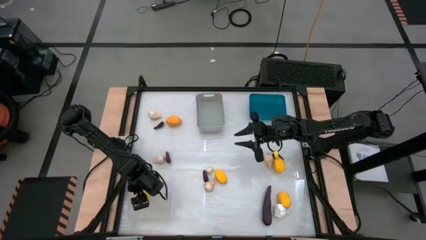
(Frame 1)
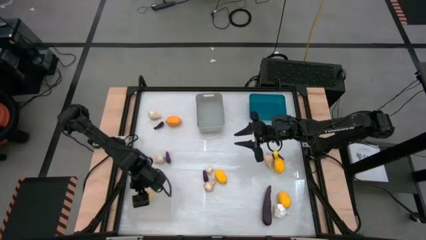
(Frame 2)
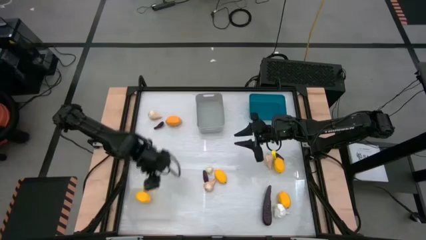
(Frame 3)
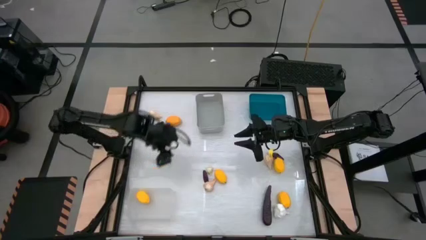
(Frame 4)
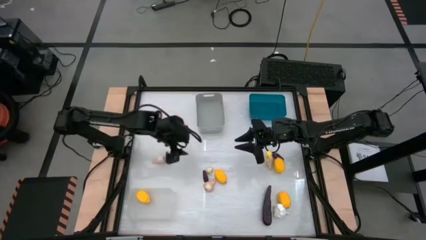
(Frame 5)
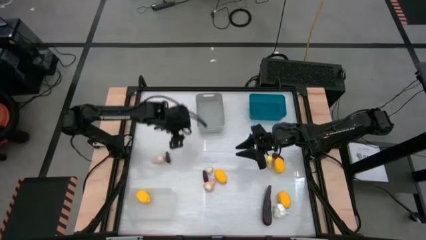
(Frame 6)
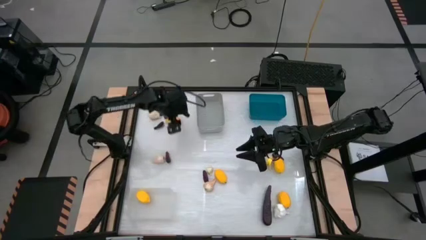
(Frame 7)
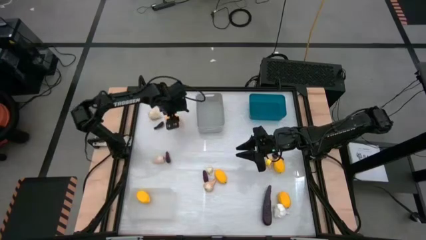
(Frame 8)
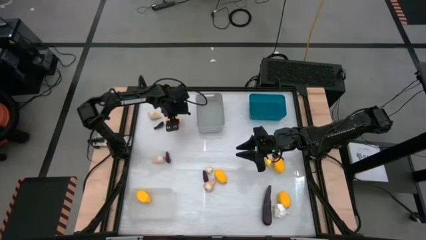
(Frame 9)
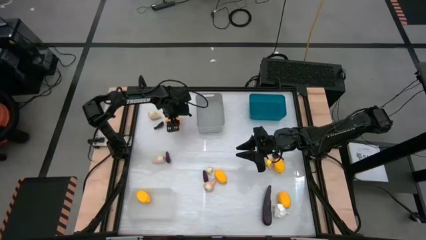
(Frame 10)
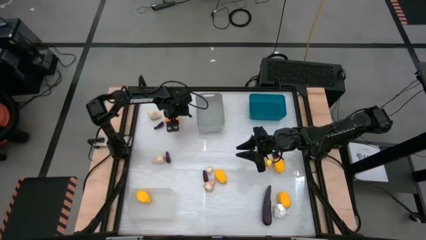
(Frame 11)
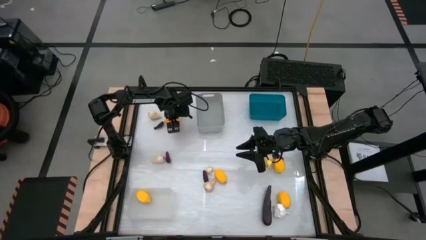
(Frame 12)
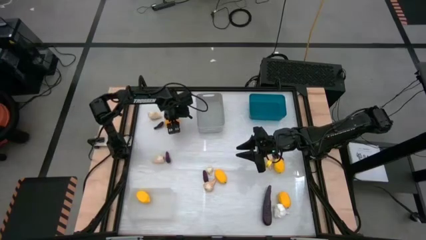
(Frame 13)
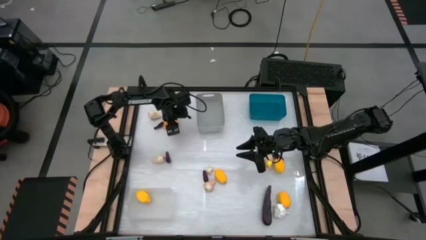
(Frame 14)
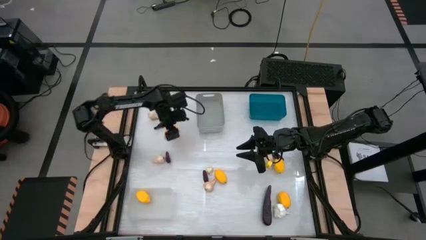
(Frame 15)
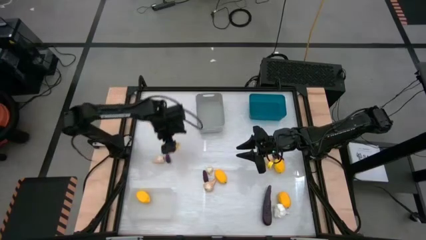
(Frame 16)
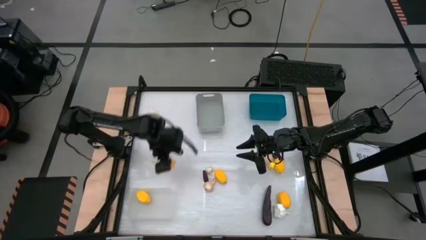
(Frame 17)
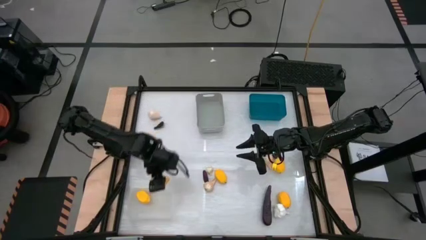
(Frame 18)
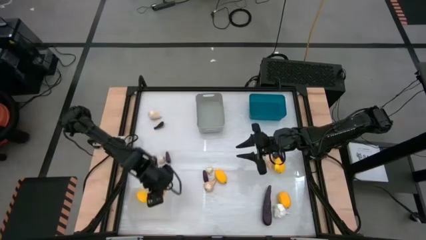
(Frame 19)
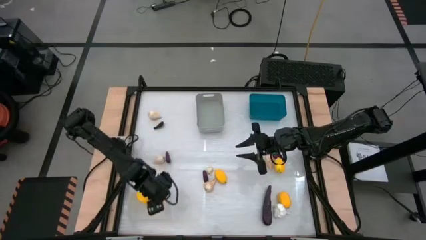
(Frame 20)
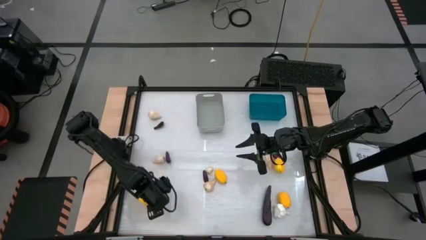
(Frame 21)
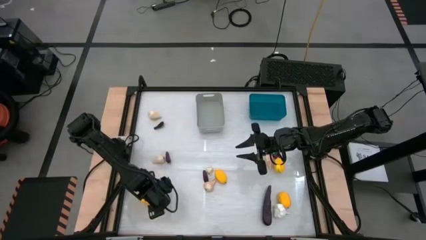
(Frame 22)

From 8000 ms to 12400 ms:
Task: Sort produce into baskets
Put the lemon into the transparent bin

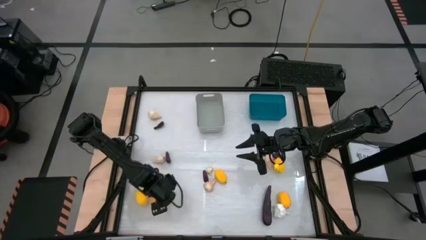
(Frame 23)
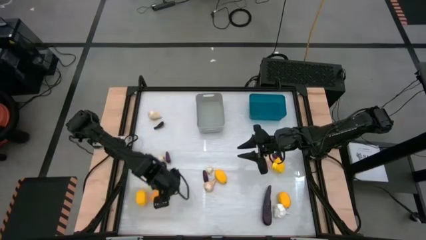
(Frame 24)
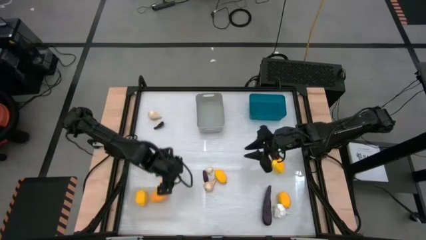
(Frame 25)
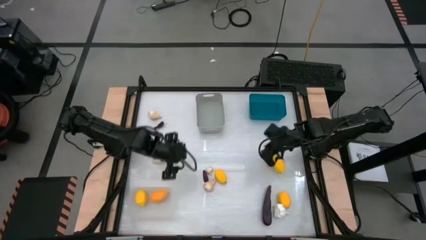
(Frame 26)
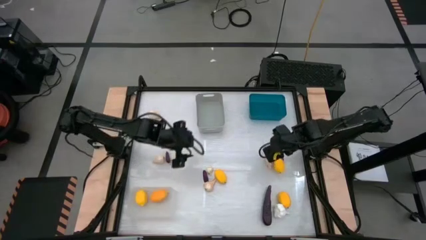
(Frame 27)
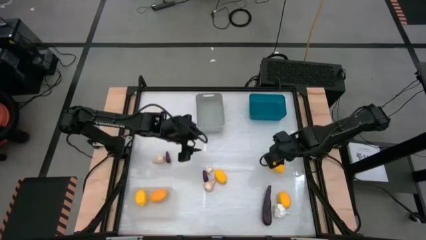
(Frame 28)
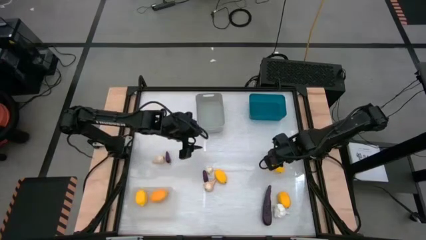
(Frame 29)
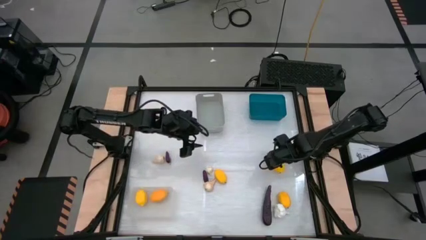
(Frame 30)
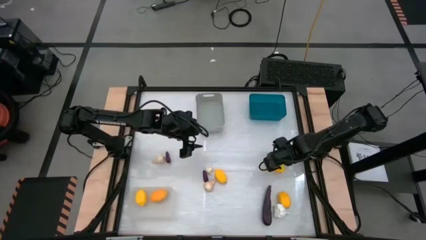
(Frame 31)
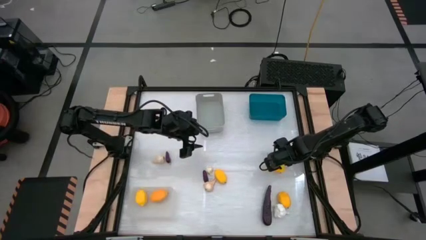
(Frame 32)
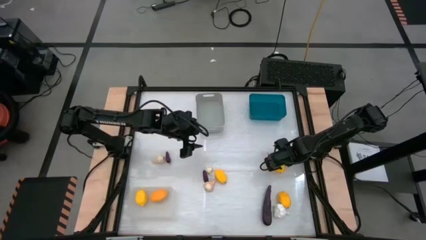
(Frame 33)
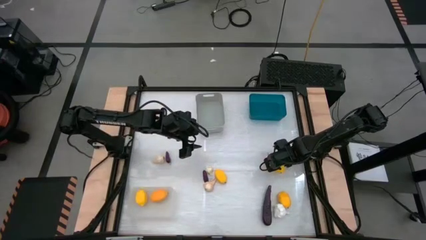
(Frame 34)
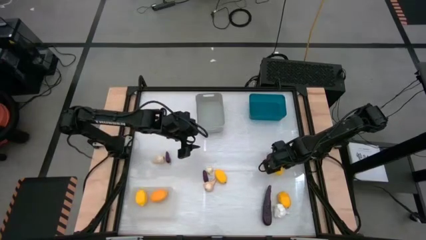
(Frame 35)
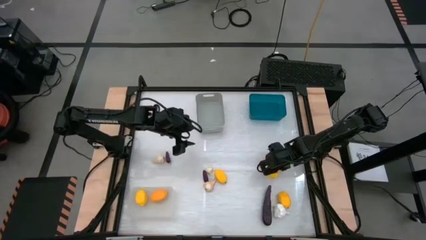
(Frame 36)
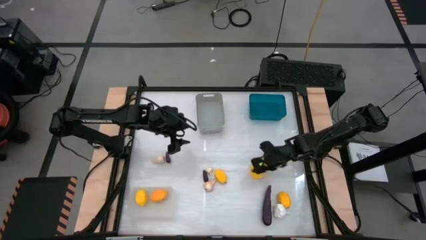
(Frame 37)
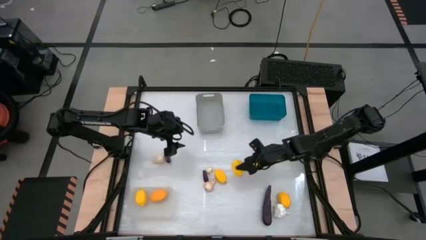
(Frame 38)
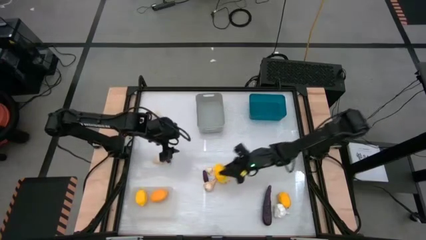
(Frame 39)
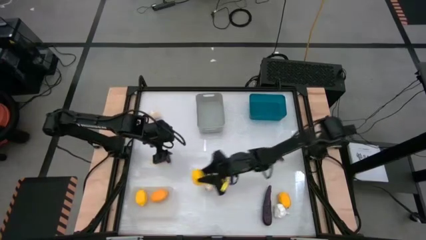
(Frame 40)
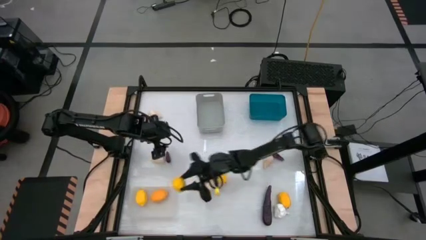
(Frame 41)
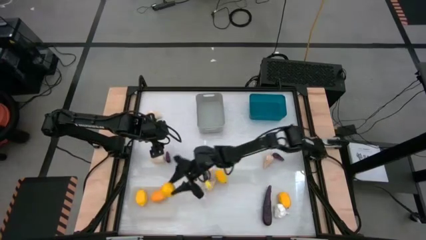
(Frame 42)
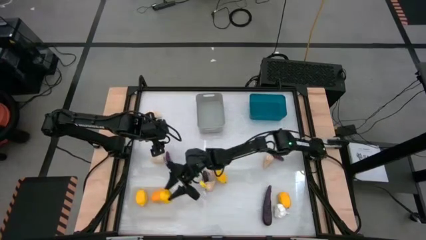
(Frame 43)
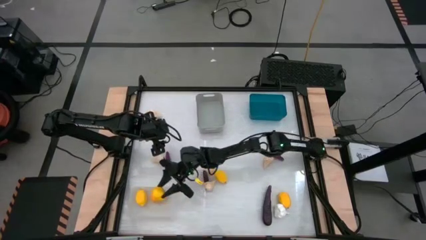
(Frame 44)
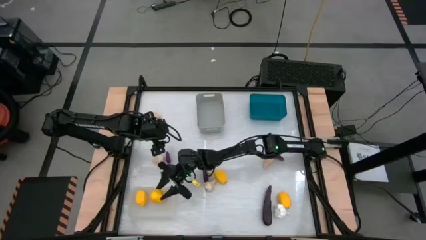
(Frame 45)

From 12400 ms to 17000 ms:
Put the lemon into the transparent bin

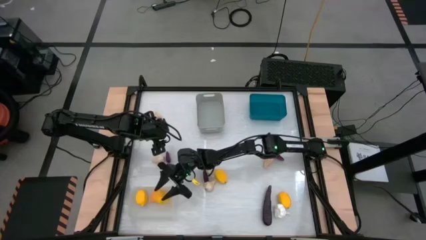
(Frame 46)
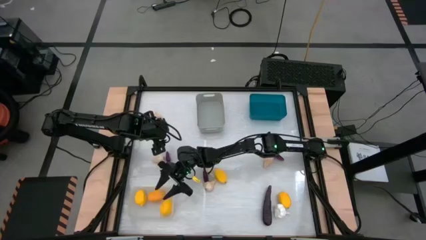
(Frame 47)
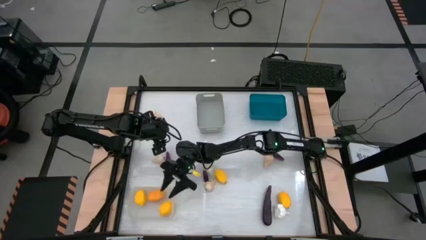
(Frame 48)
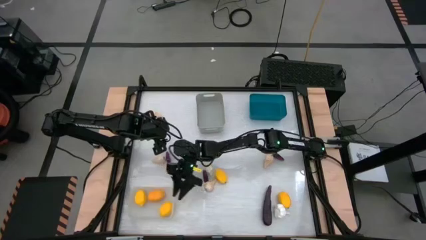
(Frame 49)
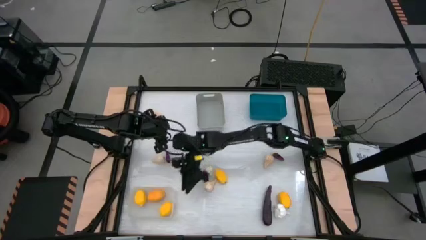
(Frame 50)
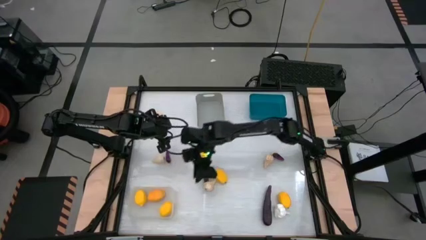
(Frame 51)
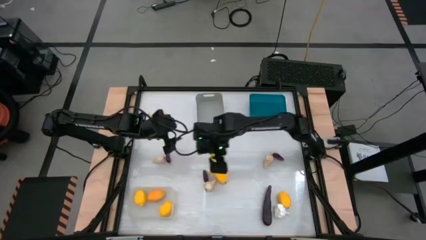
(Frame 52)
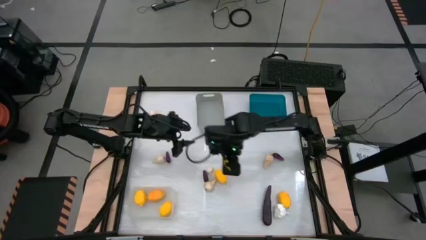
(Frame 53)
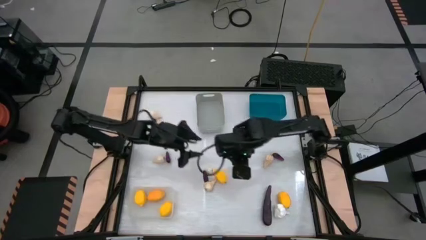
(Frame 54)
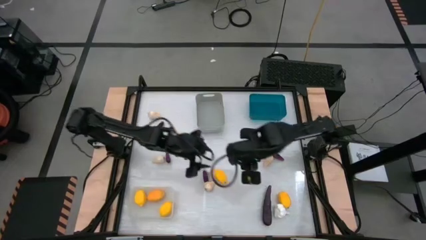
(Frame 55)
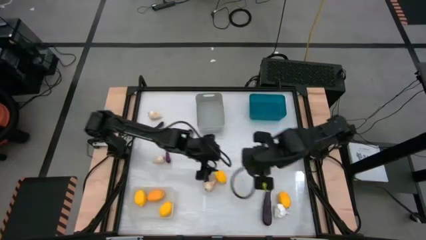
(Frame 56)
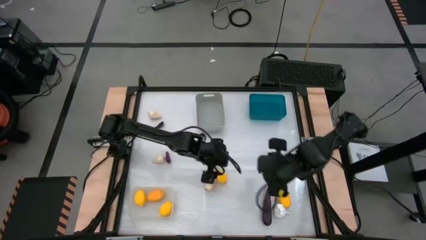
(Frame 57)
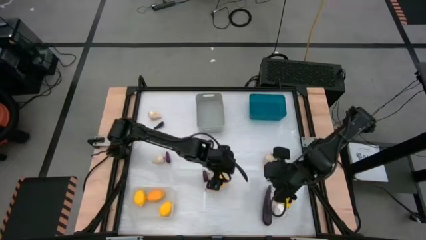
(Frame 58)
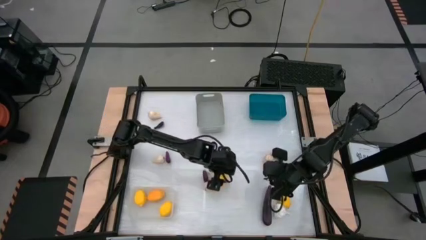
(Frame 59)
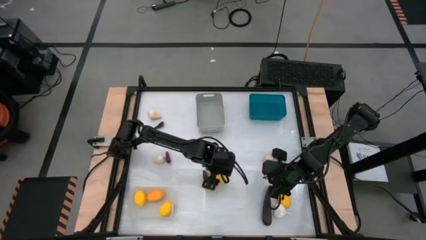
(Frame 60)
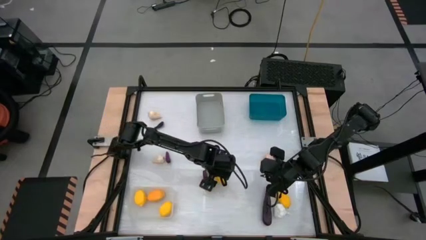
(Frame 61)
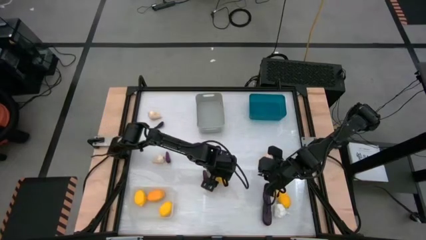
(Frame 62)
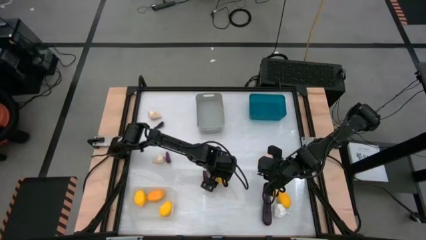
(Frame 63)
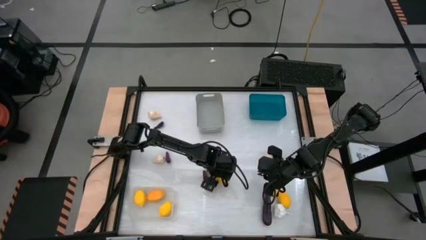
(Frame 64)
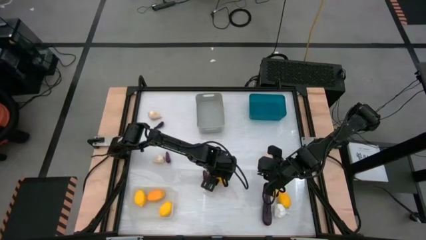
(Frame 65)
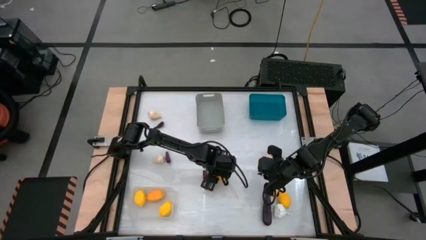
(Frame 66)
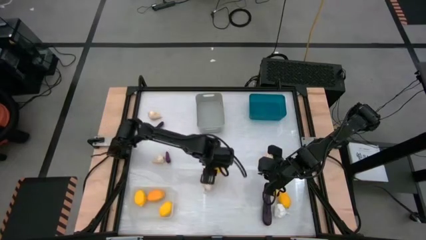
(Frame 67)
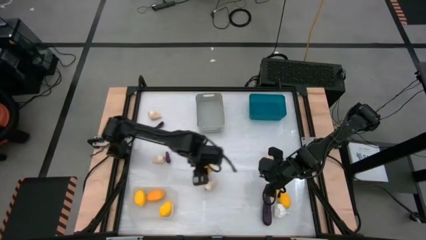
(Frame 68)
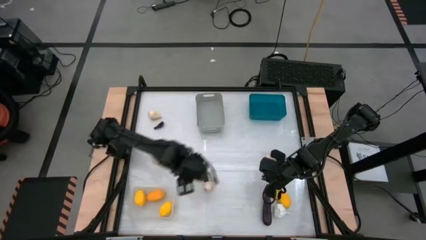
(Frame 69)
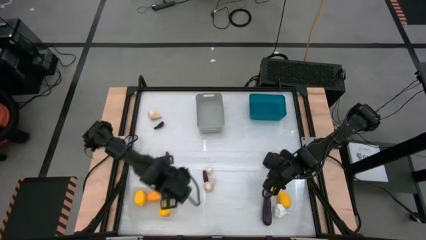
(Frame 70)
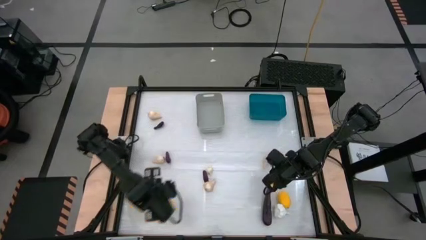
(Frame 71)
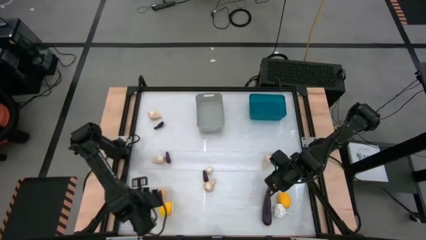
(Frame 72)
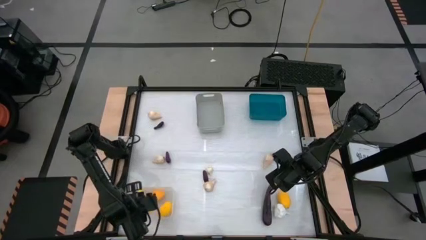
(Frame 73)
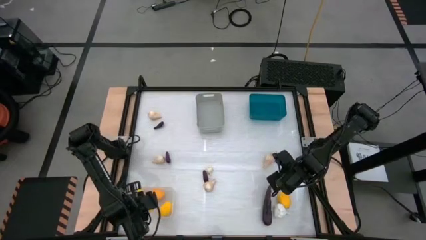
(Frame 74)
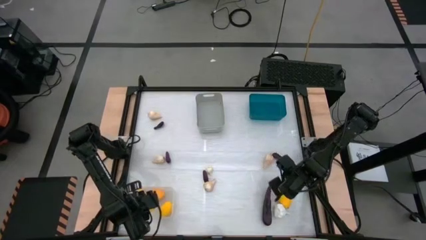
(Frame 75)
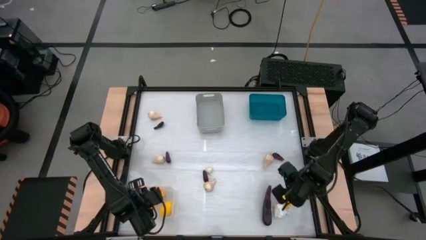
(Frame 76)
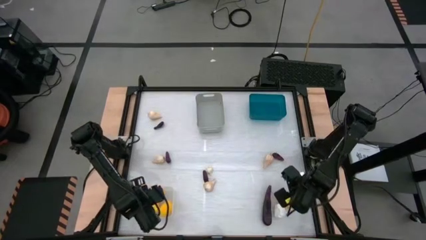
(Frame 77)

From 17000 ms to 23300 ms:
Put the lemon into the transparent bin

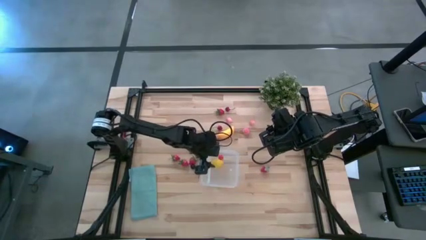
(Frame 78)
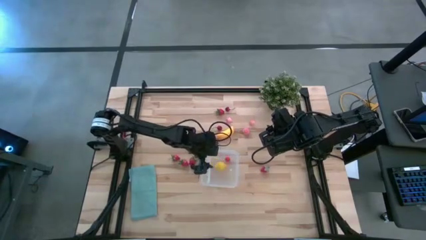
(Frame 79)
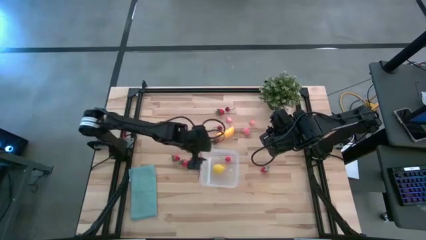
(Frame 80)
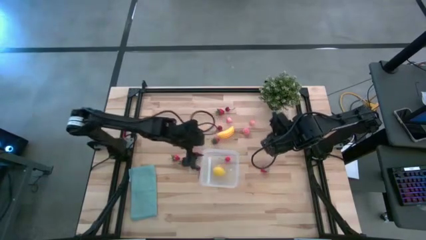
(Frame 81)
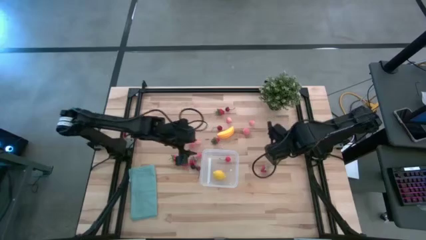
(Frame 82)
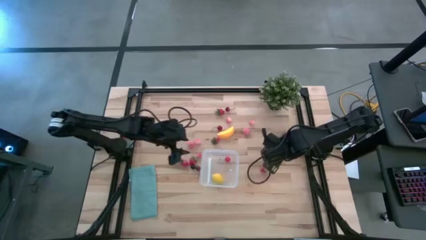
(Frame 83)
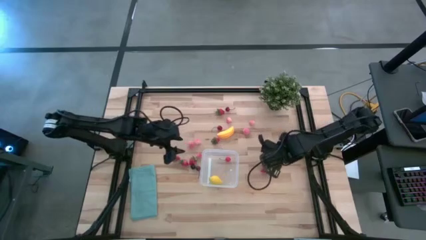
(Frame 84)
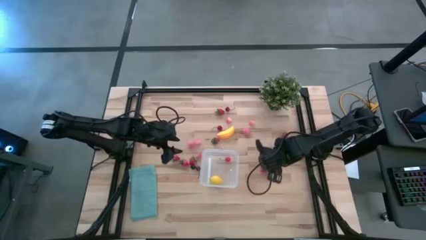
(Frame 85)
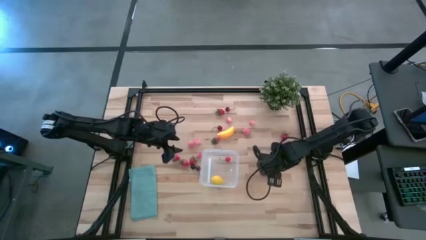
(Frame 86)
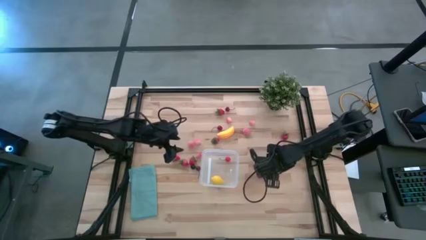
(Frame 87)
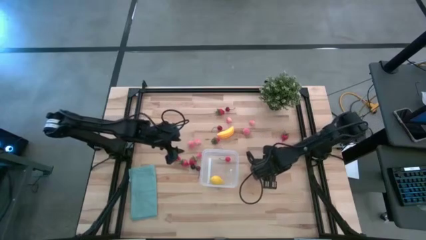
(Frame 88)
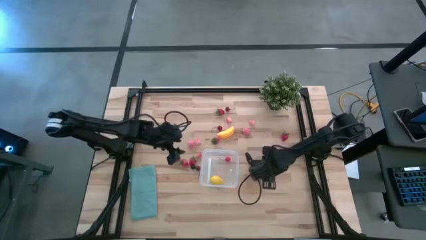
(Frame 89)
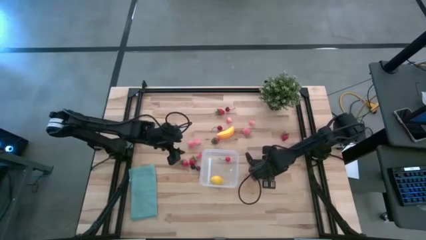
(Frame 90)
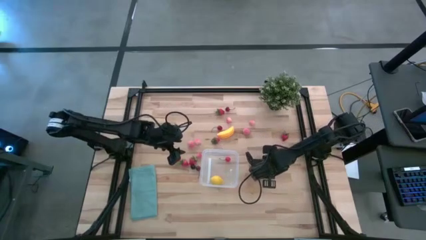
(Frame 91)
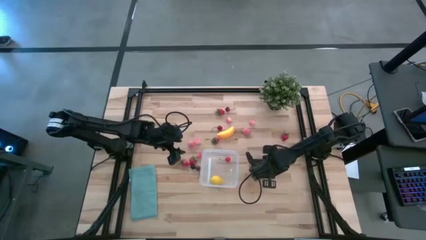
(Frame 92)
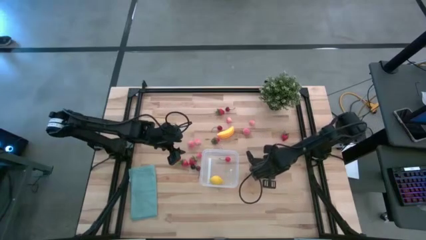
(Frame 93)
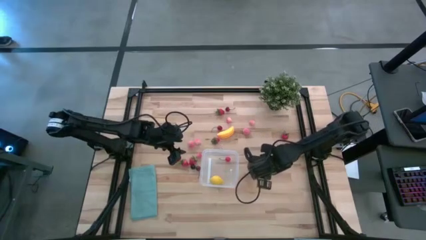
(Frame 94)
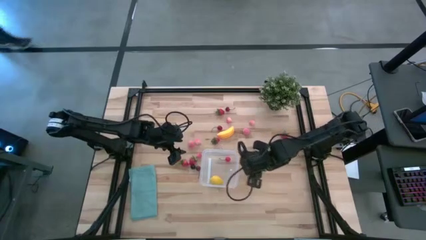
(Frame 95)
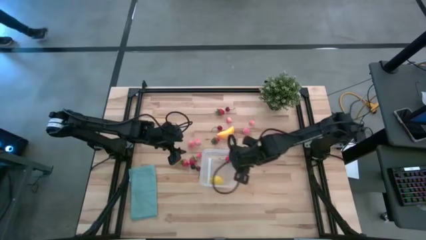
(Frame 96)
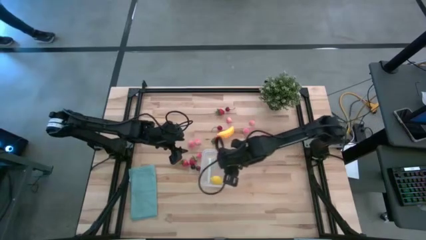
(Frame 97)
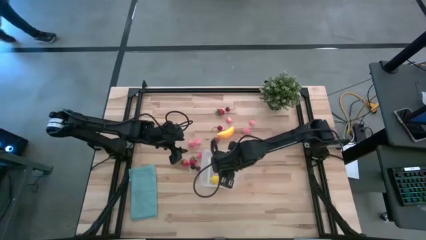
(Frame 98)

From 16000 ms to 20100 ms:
Task: Pick and placing Produce into tupperware
Put the red strawberry into the transparent container
